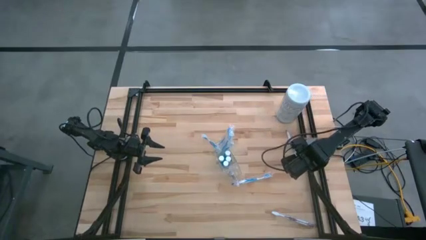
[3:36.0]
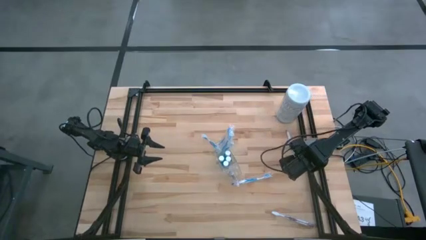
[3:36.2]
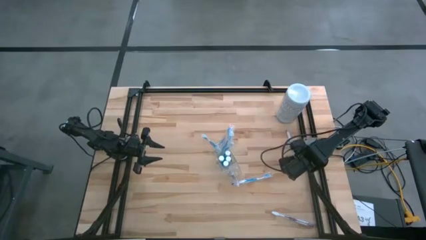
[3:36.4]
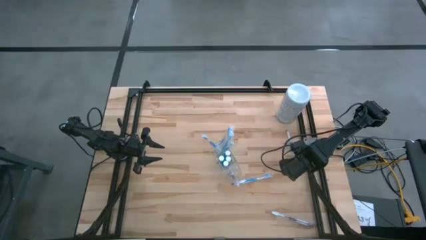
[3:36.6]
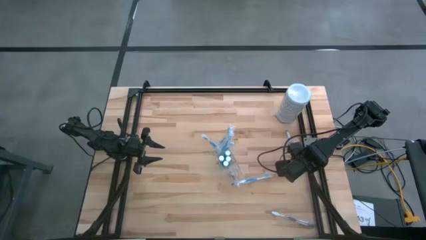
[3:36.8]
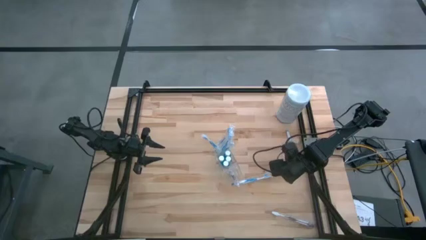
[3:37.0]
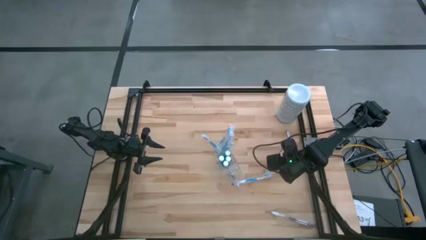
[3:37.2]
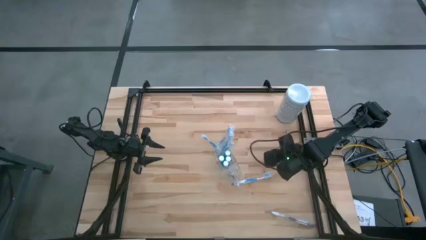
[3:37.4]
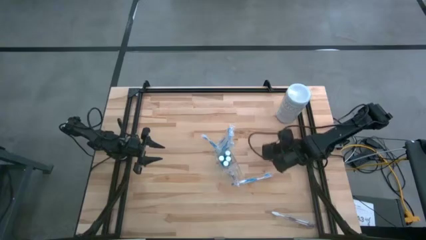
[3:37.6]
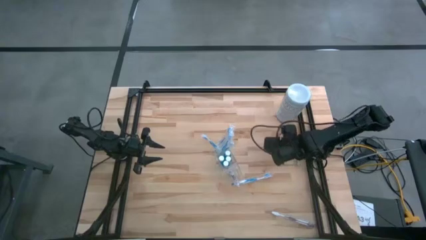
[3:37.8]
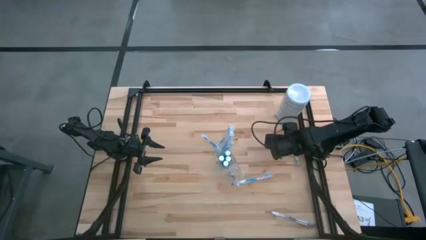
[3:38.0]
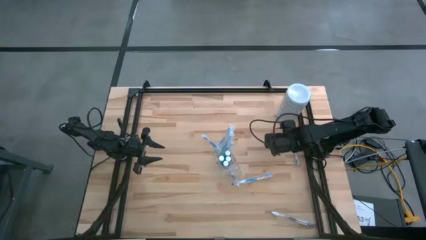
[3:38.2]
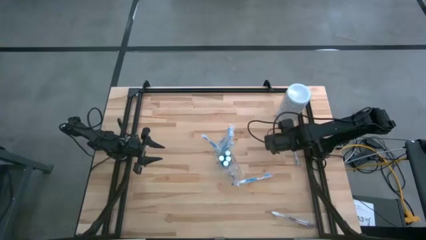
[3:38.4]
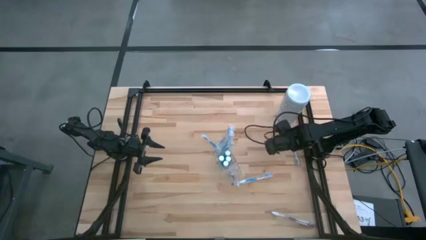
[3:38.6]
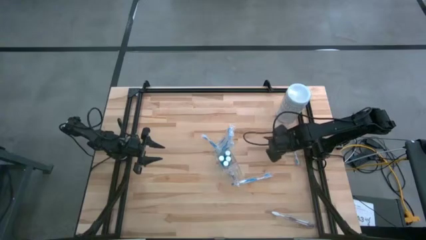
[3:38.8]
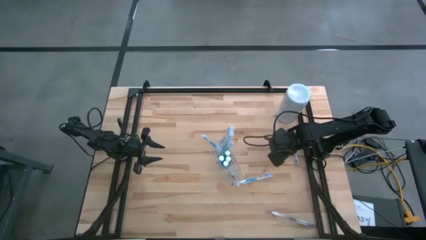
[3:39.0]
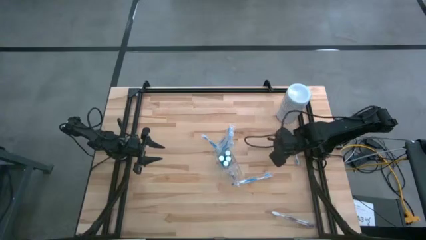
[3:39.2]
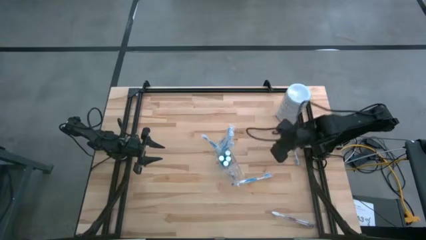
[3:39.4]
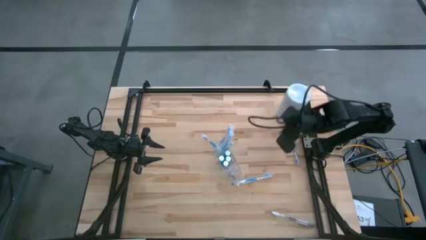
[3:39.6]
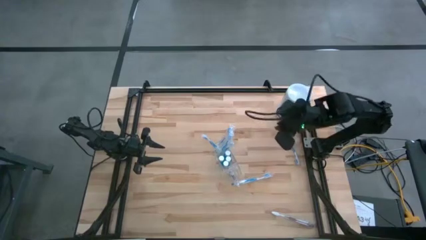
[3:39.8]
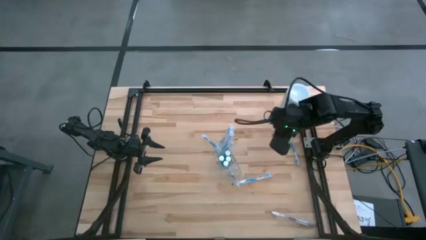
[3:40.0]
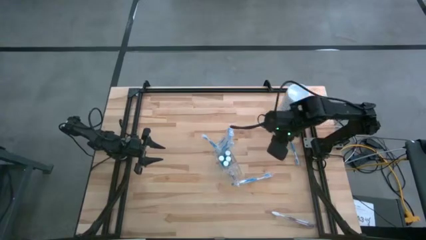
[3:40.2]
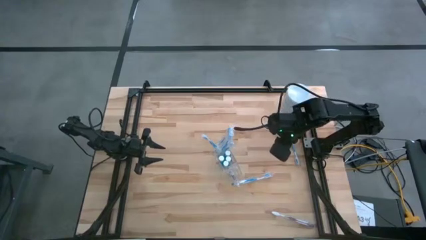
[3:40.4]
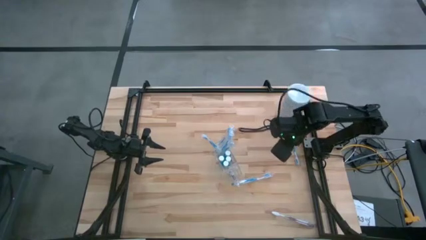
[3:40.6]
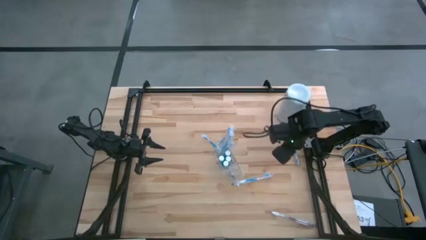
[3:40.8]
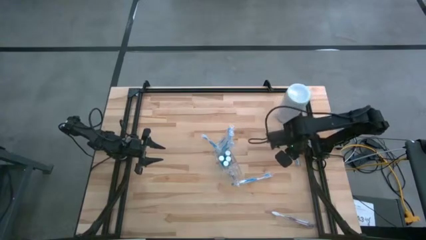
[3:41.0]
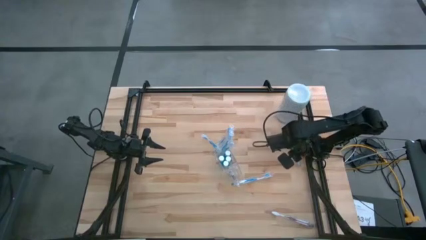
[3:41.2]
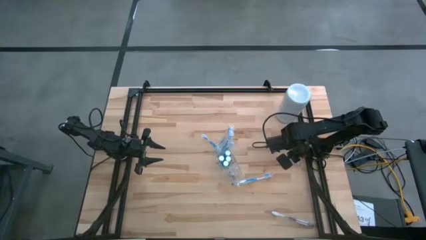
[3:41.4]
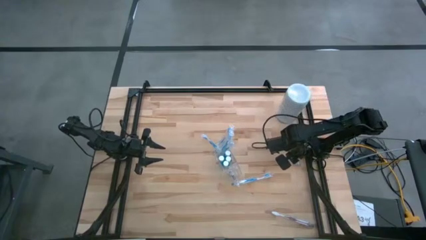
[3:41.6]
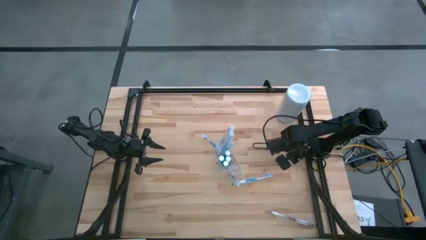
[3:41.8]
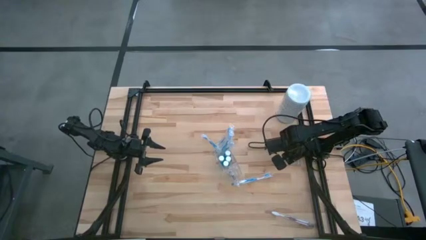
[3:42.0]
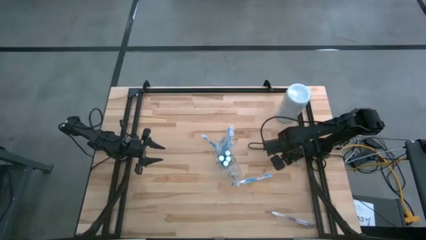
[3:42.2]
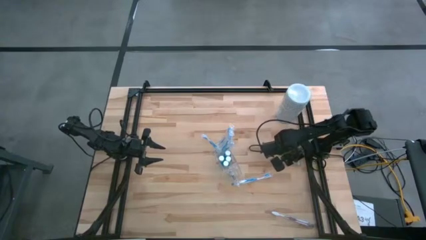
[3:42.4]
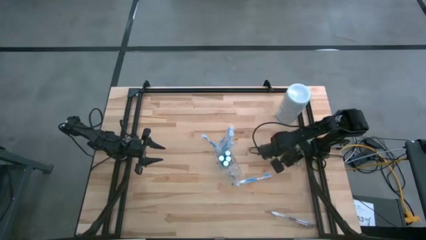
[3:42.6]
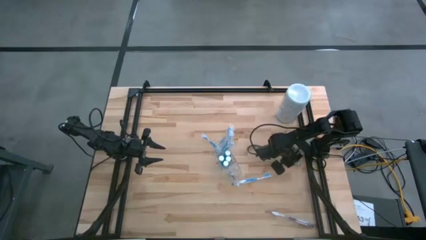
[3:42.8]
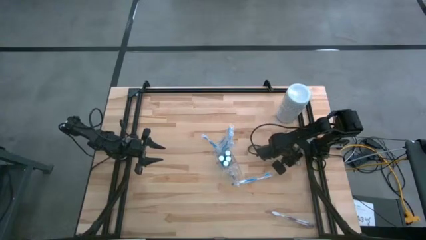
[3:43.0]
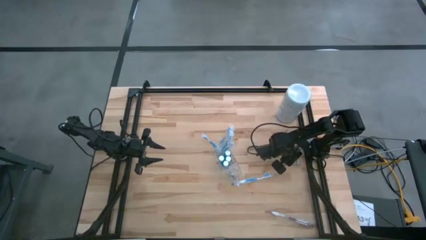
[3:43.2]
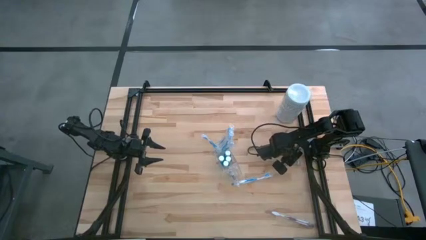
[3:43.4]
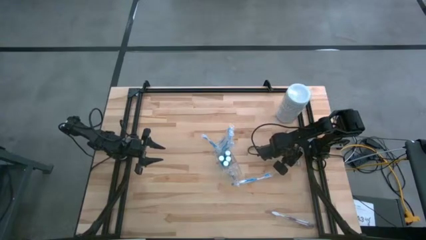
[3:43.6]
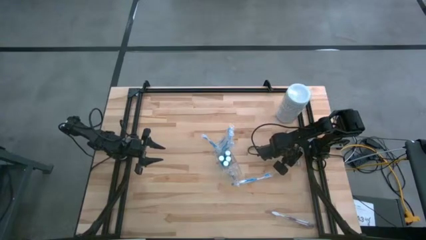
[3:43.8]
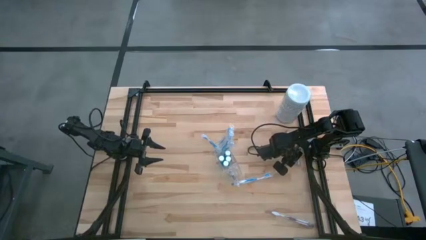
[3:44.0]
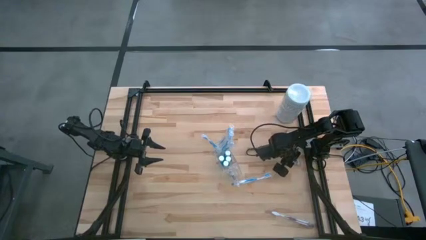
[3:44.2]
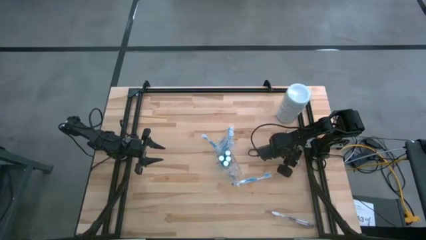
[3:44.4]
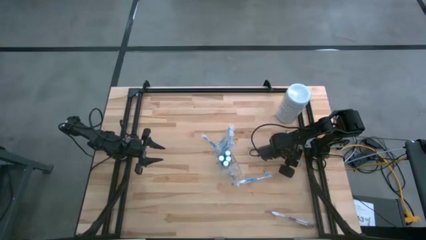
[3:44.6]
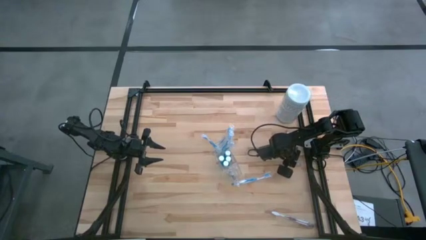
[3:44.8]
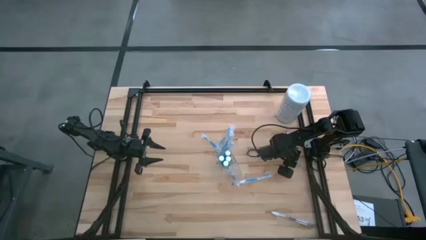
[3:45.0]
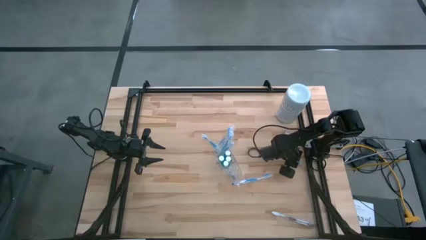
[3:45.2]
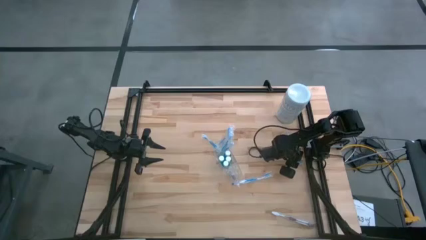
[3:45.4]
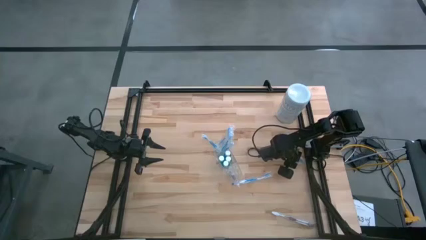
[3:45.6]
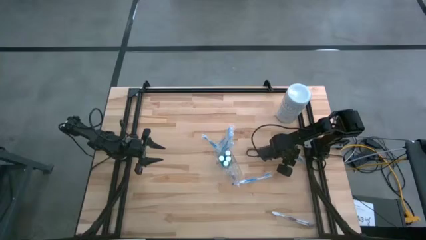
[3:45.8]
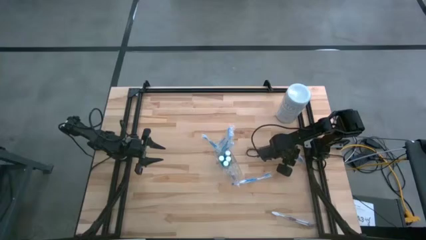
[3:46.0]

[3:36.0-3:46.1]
Task: Pick & Place toothbrushing station
Put the blue toothbrush into the left section of the transparent organizer

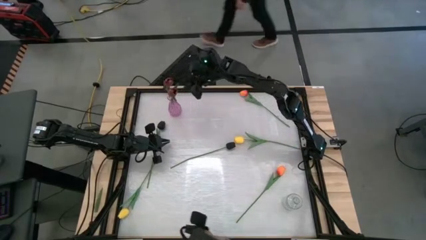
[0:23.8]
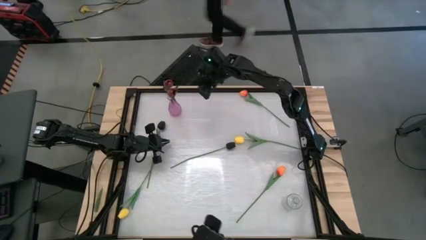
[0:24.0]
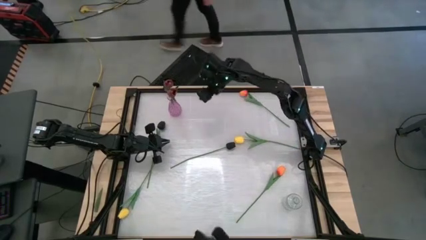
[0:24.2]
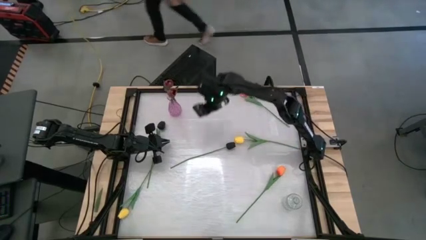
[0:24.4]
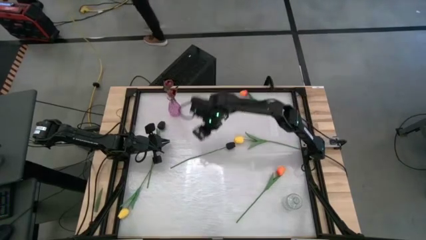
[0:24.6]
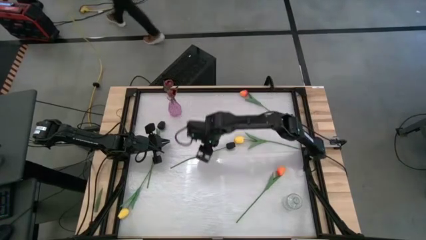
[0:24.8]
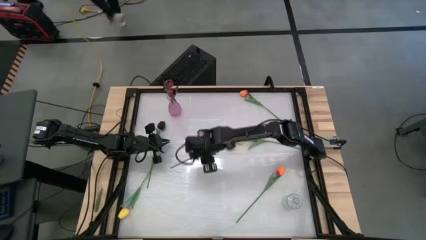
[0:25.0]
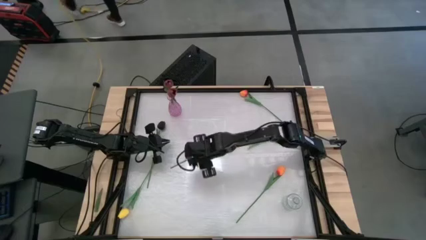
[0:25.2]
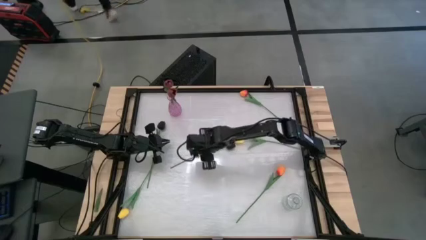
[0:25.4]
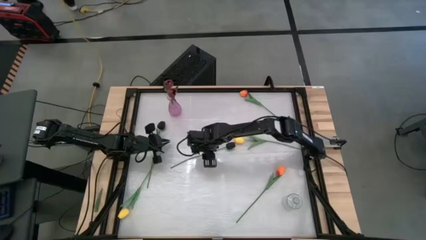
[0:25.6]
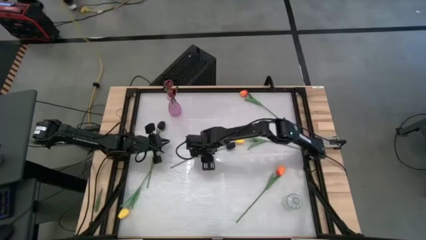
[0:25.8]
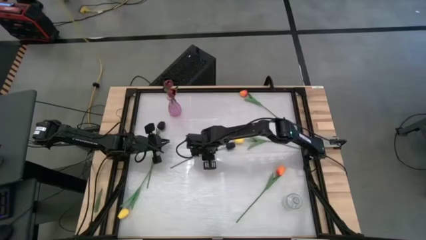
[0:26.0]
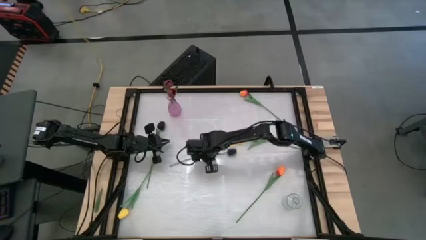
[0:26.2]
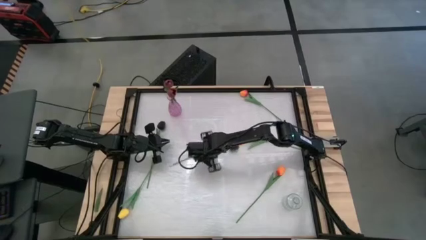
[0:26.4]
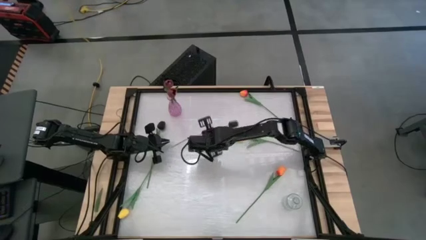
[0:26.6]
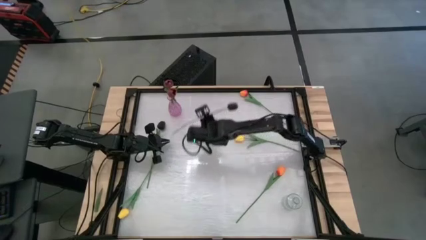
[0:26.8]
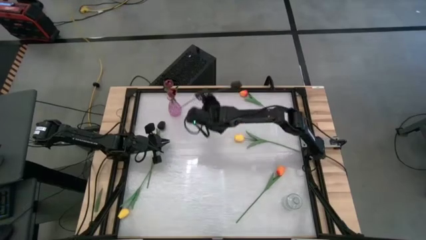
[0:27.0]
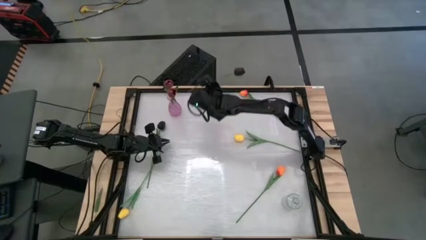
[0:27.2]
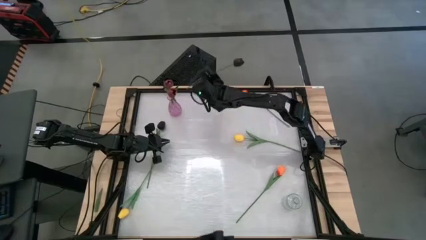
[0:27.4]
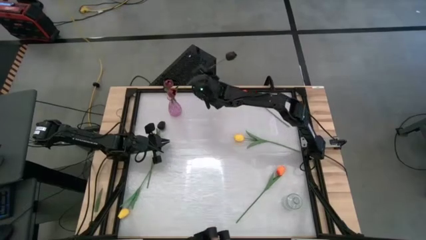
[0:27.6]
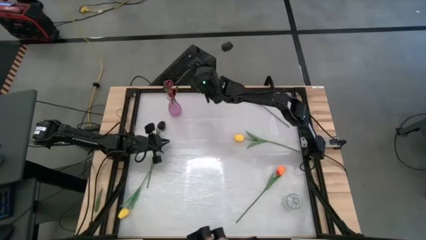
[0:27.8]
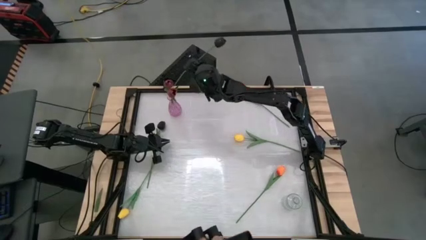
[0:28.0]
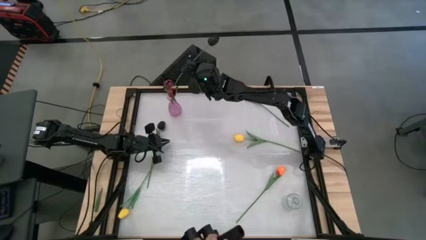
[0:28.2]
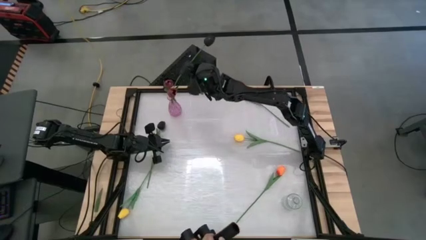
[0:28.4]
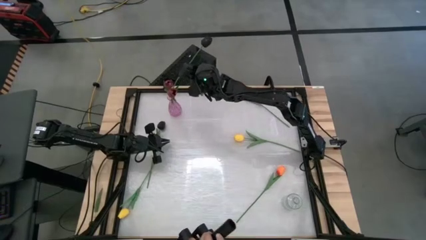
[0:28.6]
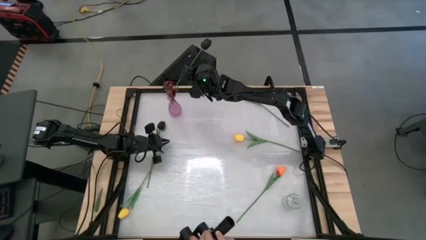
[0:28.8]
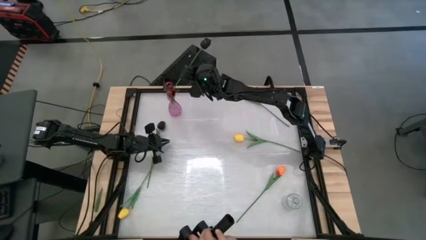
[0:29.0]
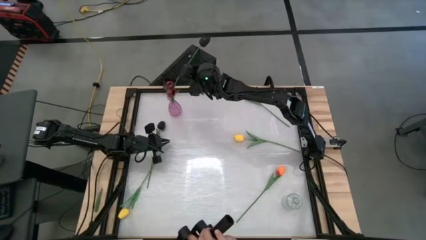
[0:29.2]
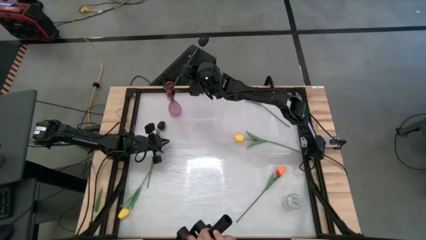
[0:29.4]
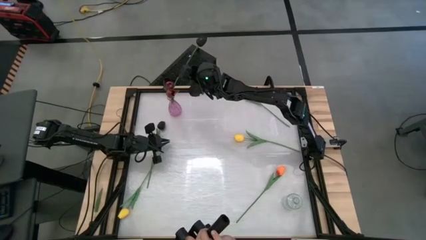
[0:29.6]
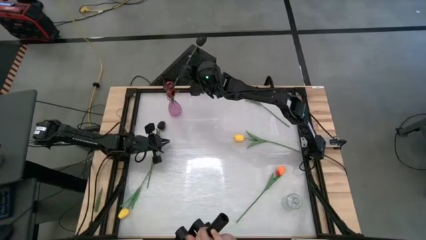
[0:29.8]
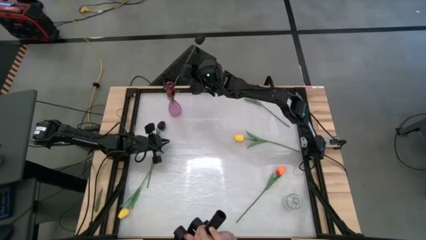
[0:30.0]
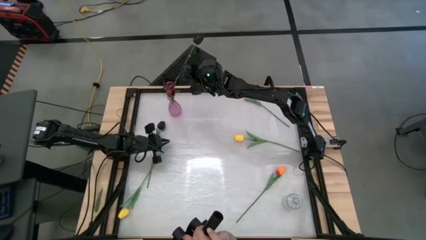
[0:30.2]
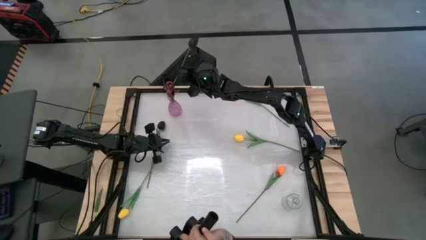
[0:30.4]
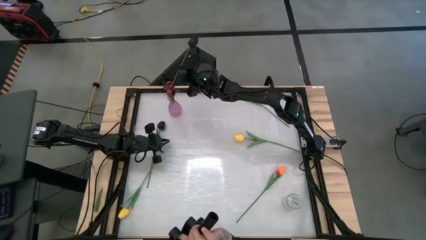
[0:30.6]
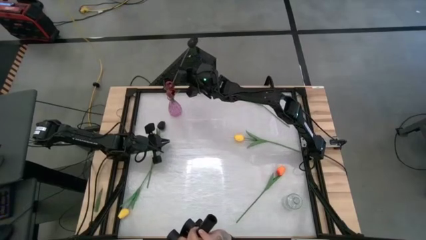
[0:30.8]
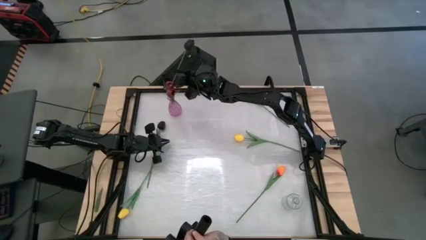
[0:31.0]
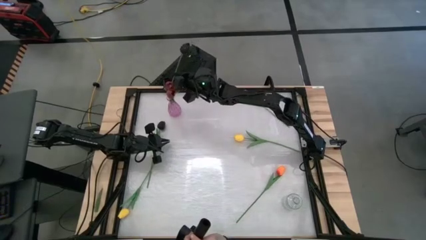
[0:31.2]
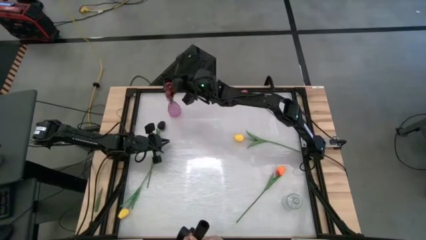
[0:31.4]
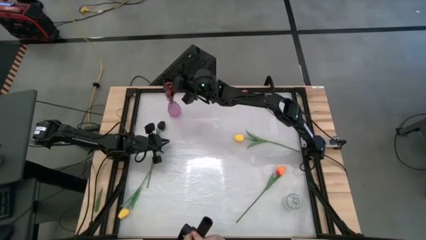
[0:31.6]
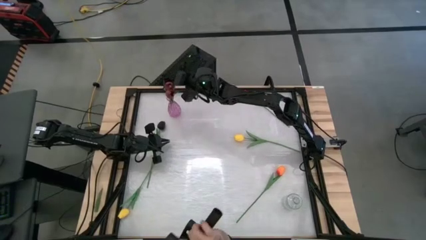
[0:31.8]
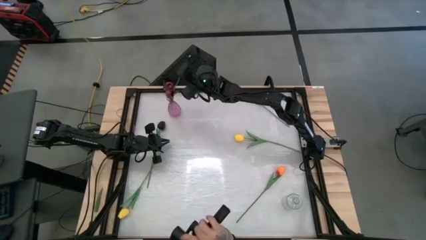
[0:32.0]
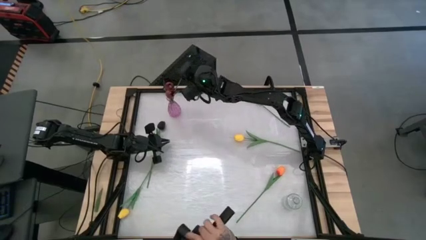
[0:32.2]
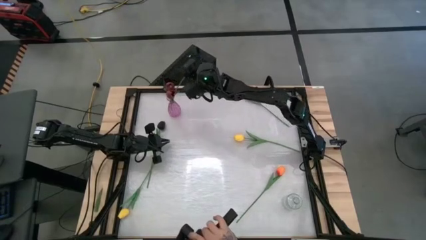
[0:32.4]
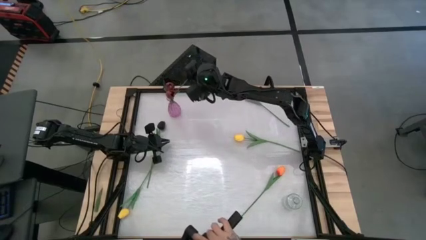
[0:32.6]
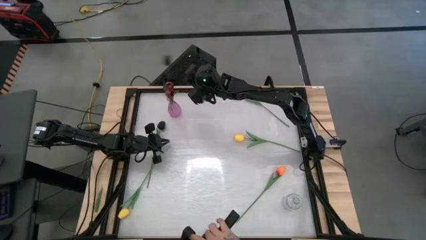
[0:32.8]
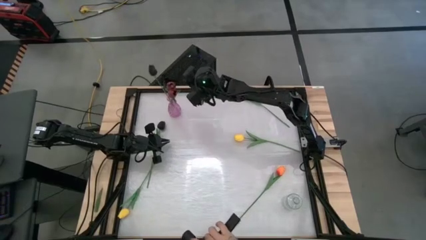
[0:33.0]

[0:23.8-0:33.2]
Task: Sort flowers into vase by color
Put the right black flower into the purple vase
